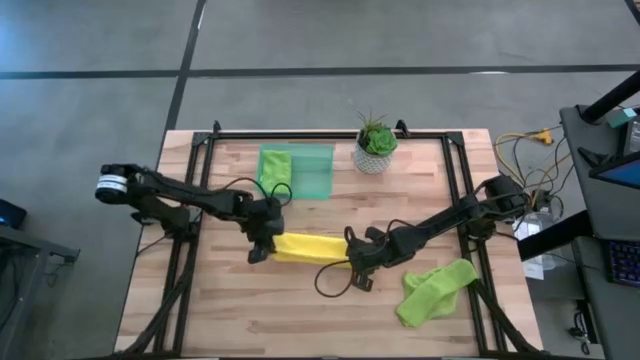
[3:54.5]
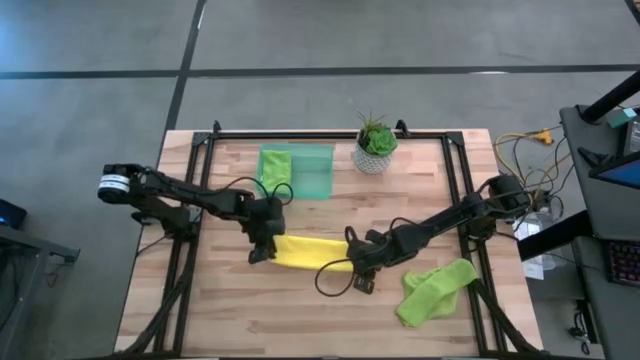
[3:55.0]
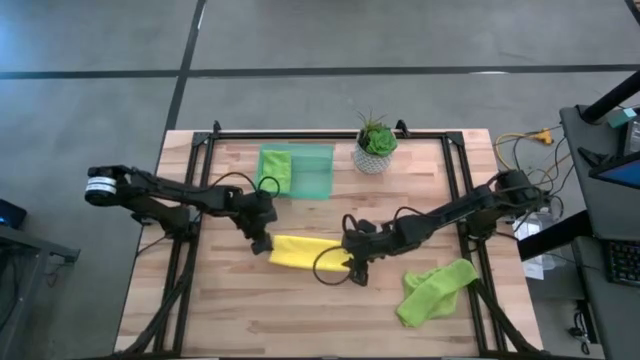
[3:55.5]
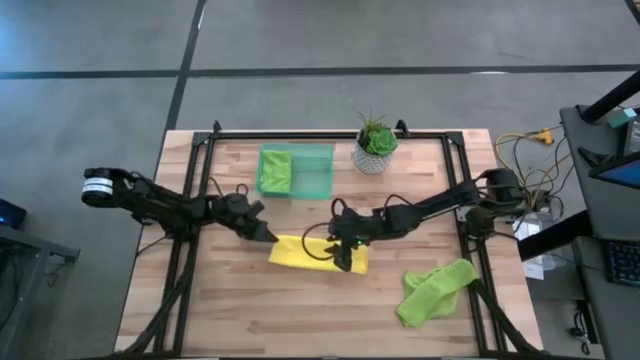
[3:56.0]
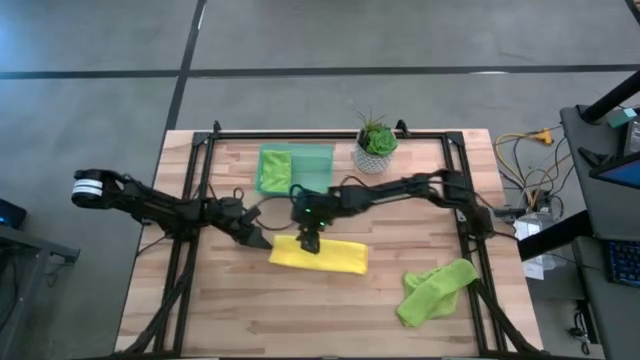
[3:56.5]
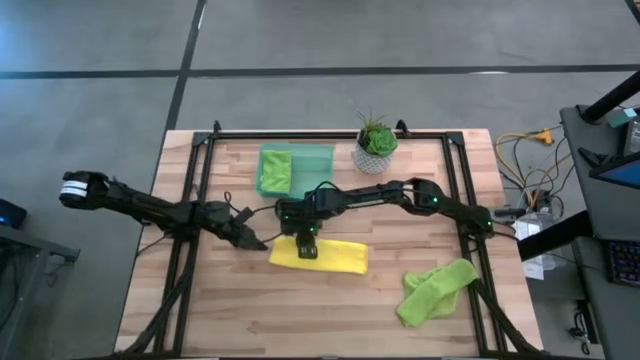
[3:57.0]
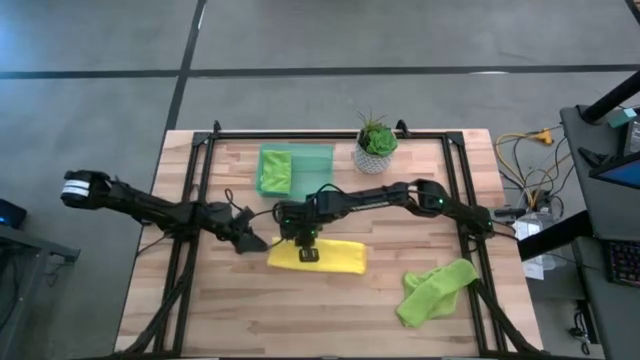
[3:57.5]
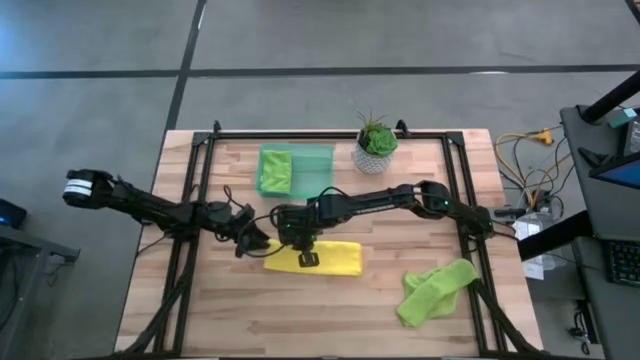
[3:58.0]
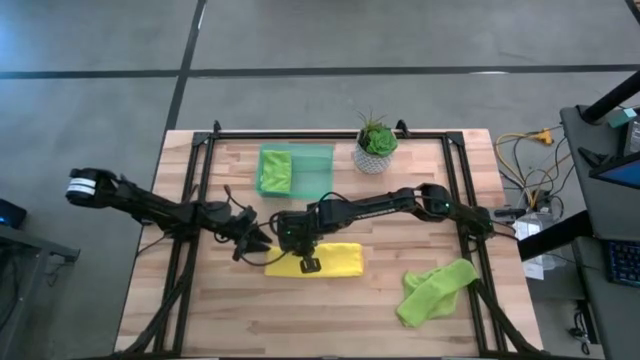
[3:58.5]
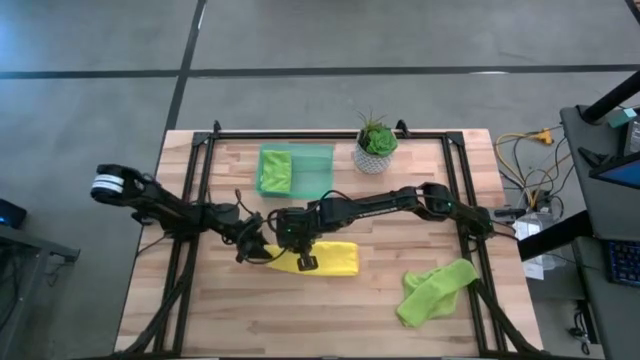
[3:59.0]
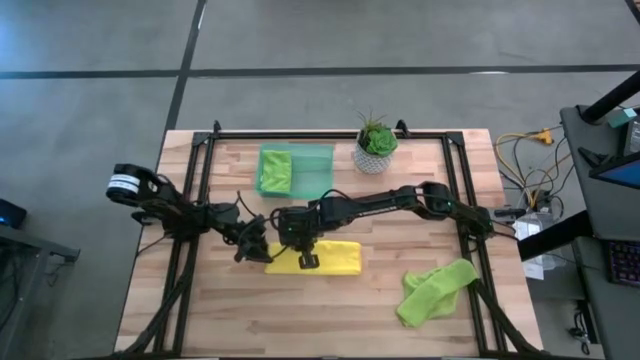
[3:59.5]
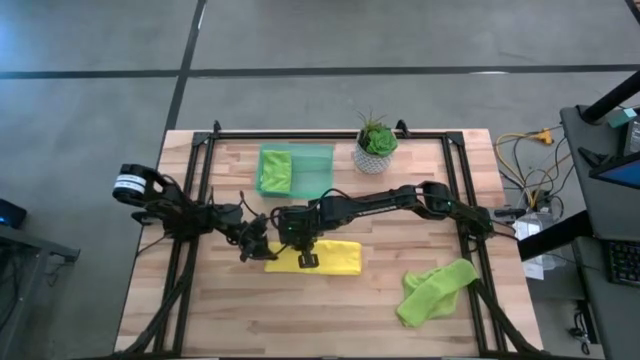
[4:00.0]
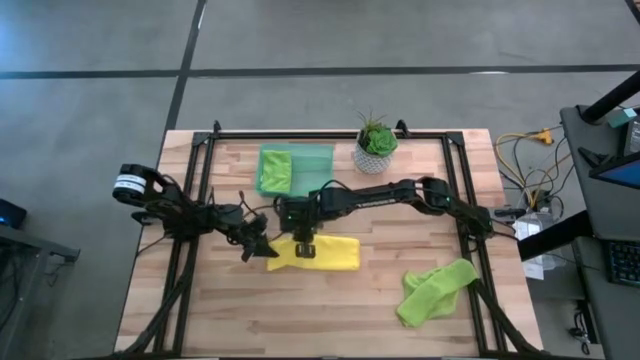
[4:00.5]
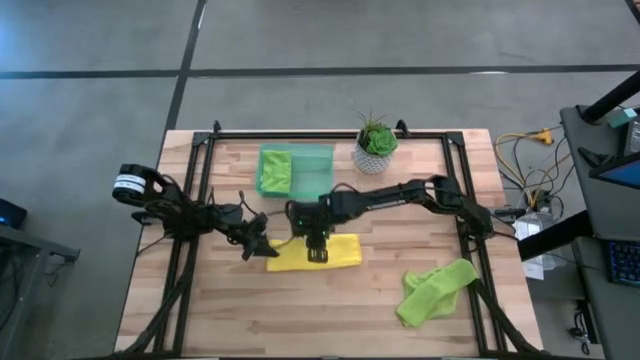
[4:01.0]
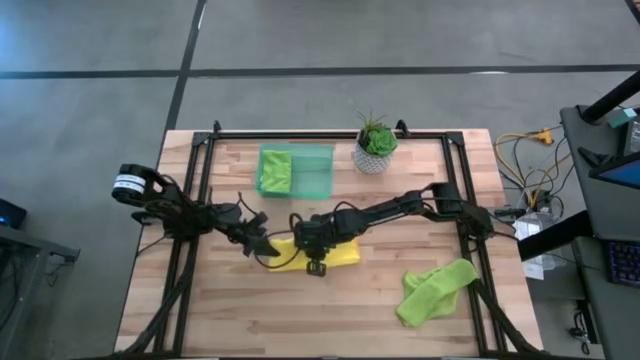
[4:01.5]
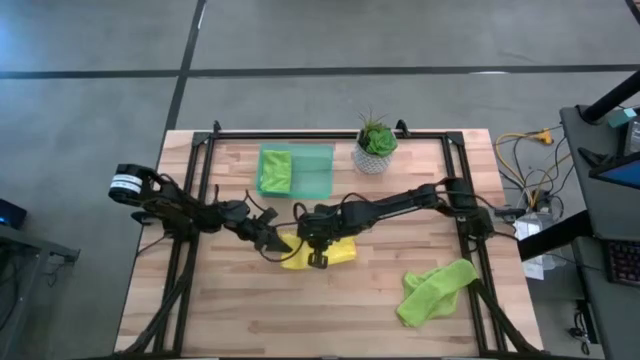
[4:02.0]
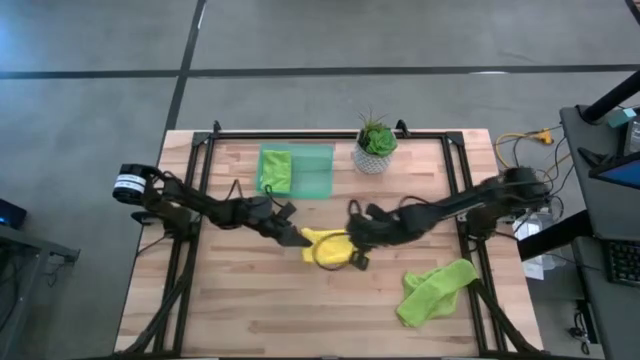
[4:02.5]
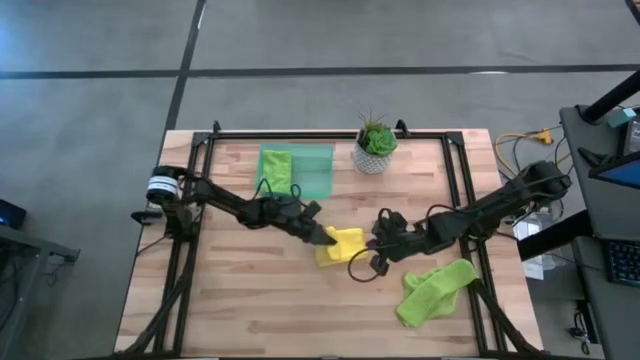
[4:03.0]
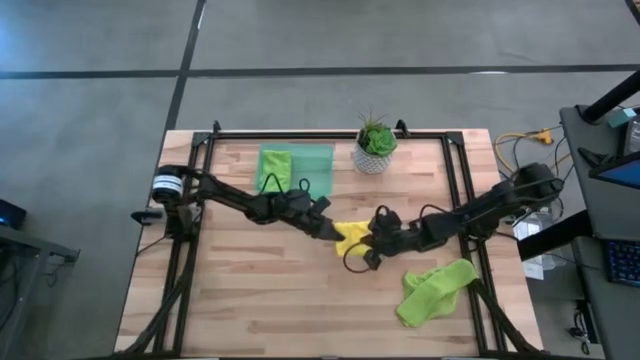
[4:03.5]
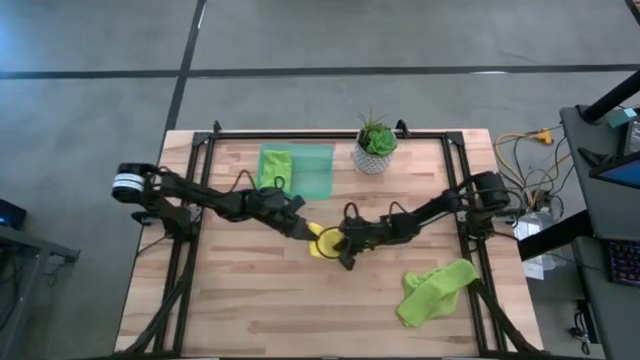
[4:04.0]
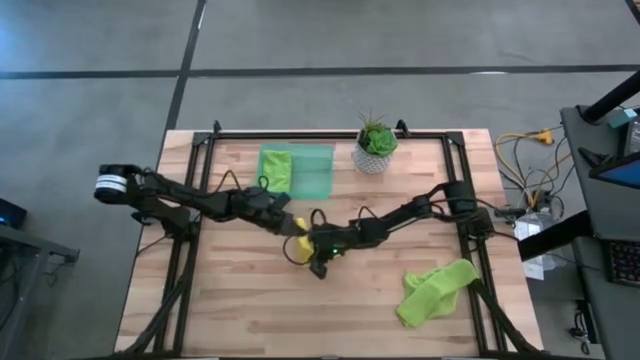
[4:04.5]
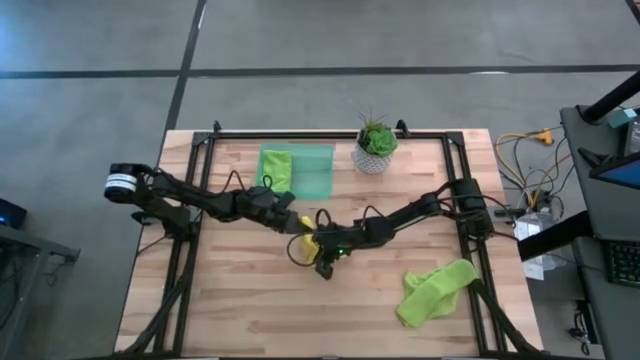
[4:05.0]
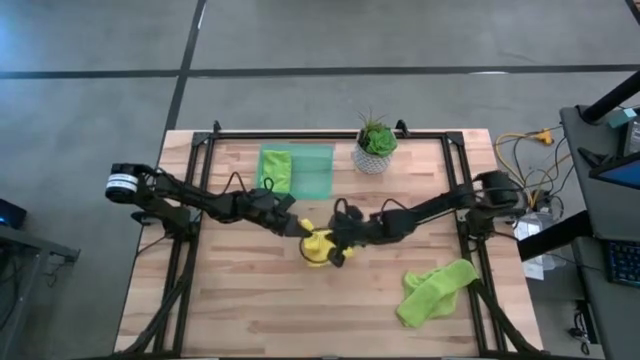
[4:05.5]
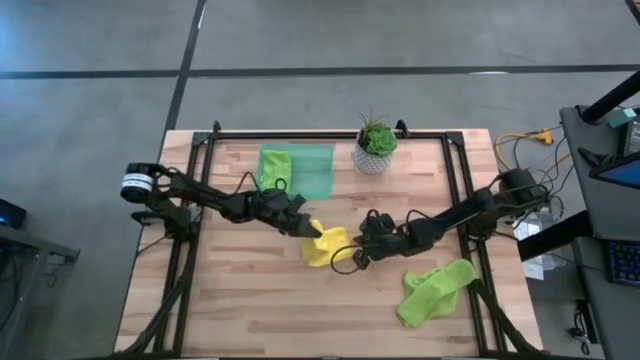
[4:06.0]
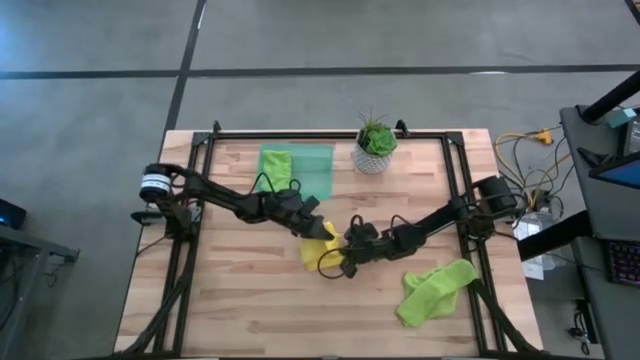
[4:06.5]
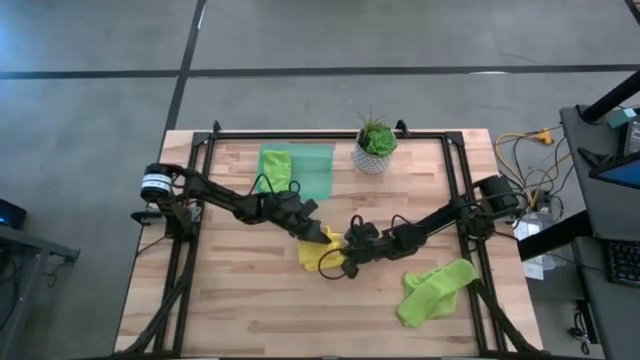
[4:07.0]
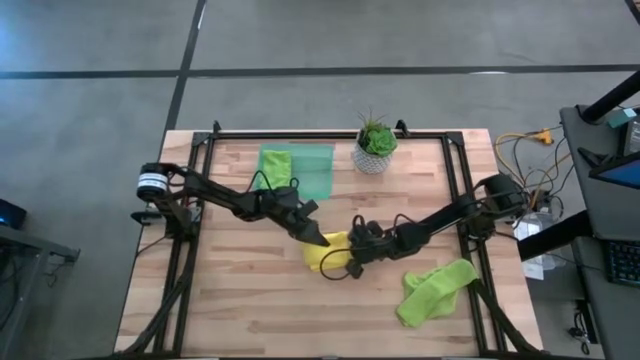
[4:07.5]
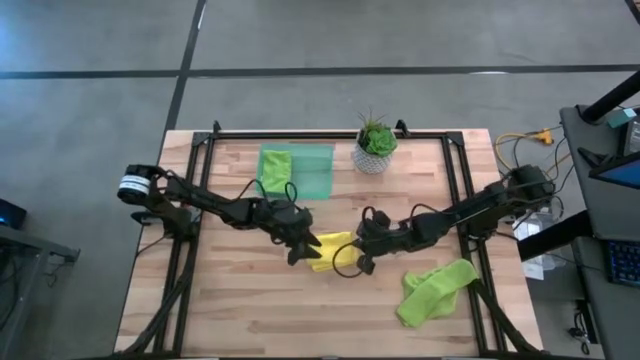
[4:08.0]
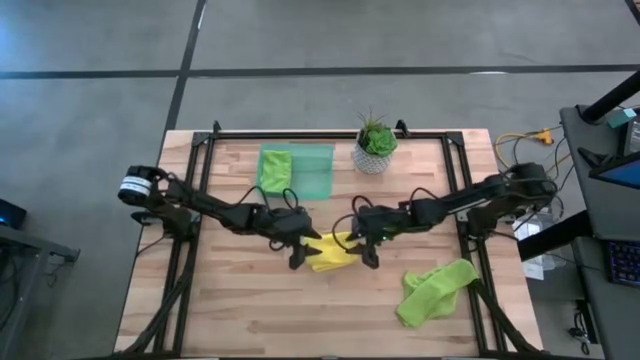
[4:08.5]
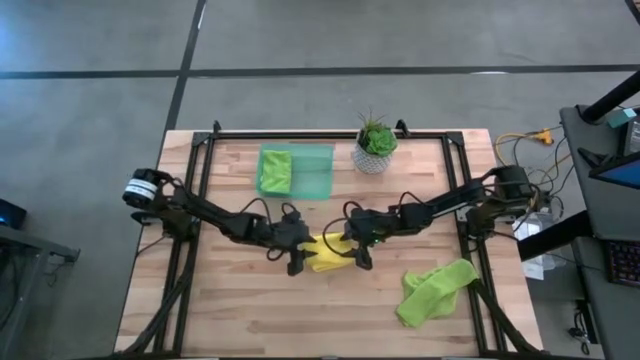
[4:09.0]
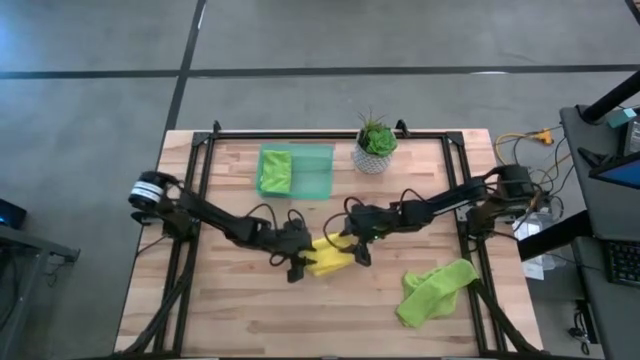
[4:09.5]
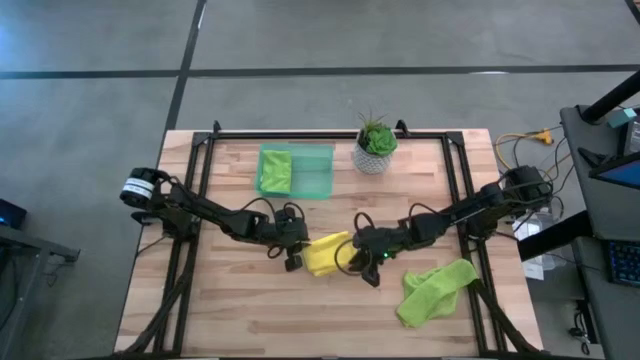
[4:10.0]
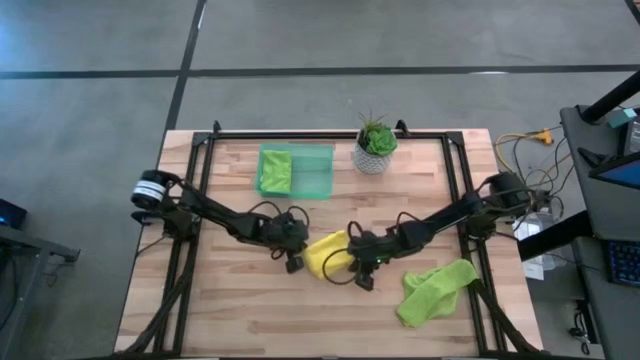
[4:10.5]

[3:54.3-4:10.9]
Task: Fold microfiber towels
Fold the yellow microfiber towel
